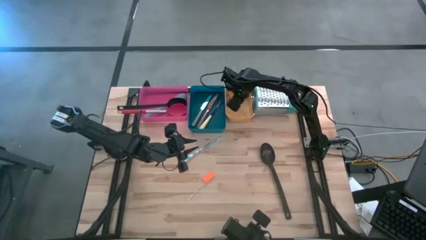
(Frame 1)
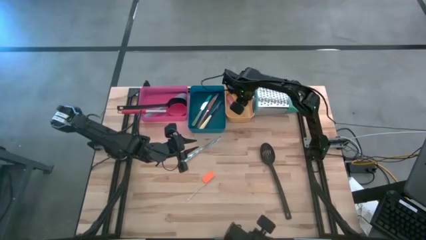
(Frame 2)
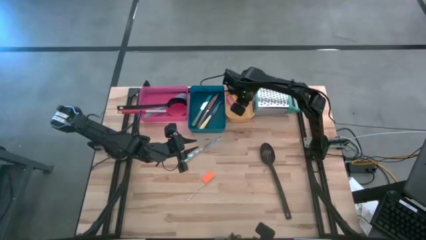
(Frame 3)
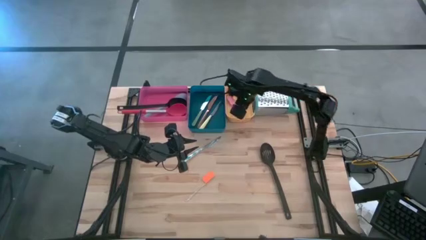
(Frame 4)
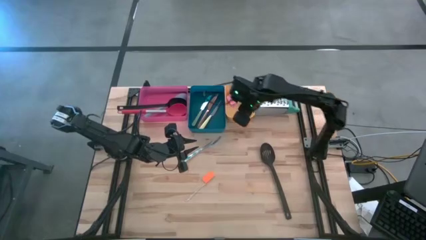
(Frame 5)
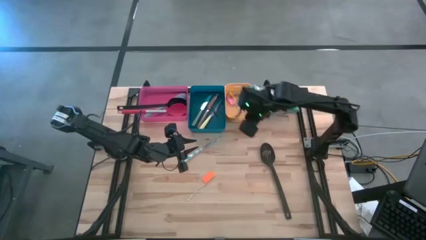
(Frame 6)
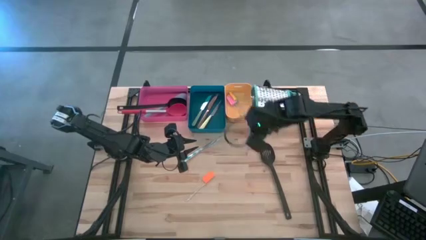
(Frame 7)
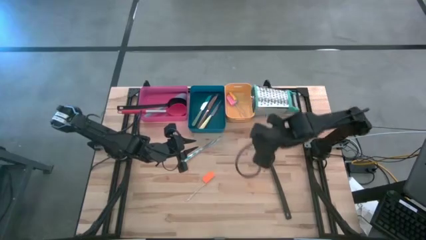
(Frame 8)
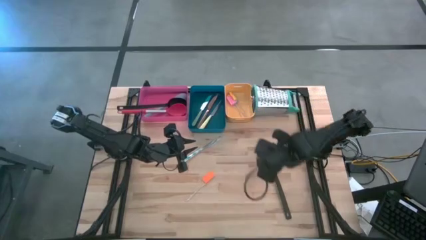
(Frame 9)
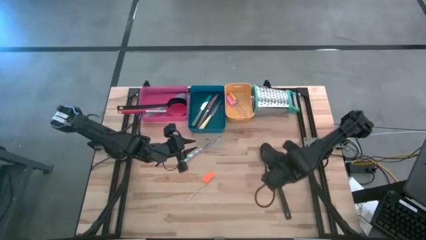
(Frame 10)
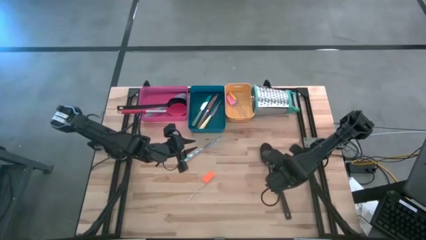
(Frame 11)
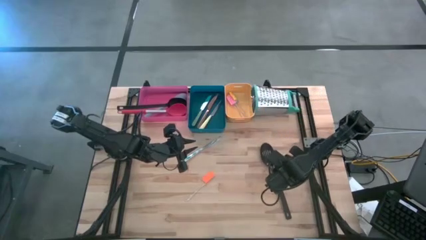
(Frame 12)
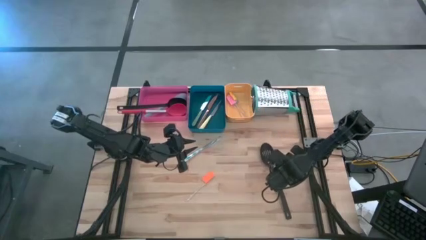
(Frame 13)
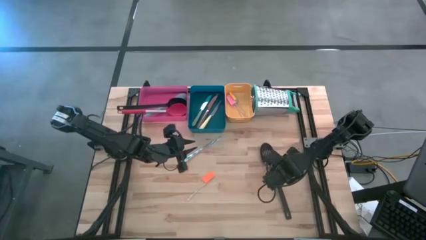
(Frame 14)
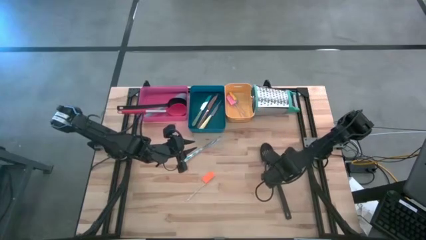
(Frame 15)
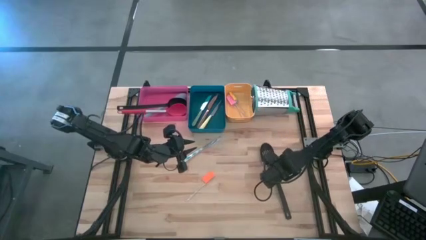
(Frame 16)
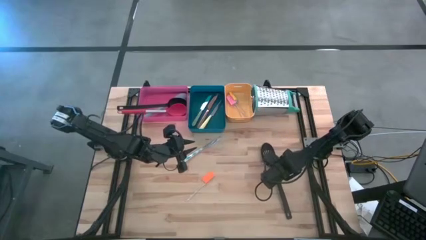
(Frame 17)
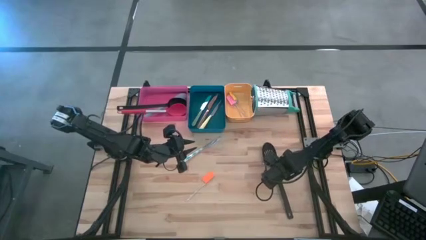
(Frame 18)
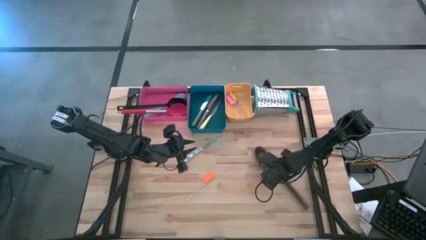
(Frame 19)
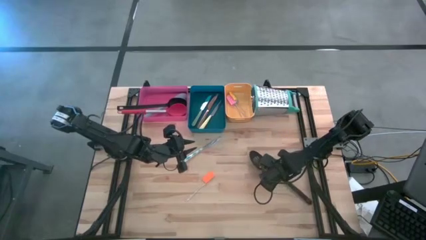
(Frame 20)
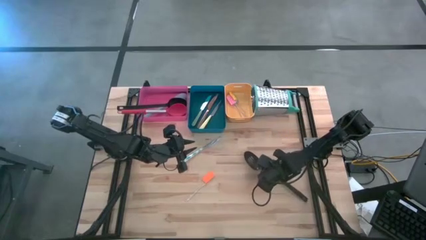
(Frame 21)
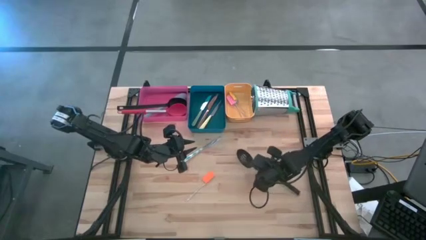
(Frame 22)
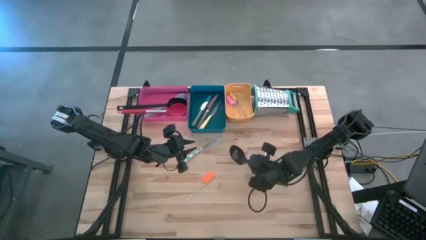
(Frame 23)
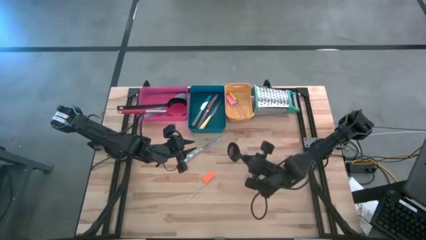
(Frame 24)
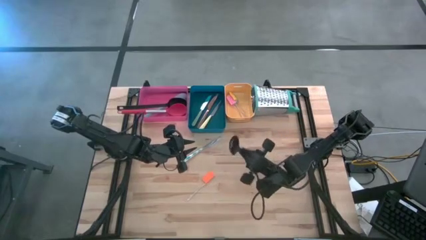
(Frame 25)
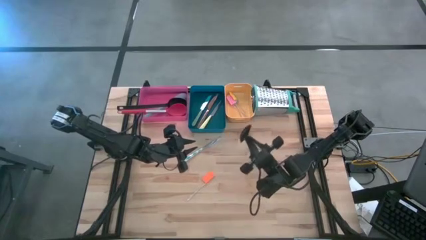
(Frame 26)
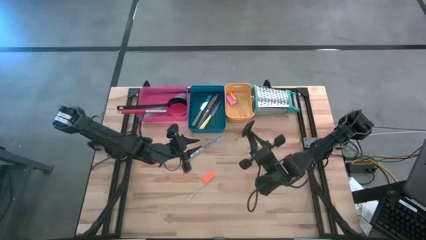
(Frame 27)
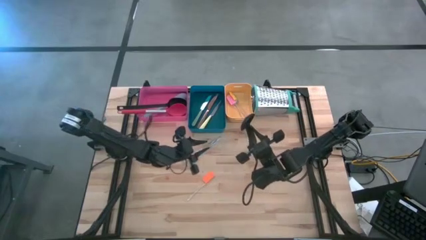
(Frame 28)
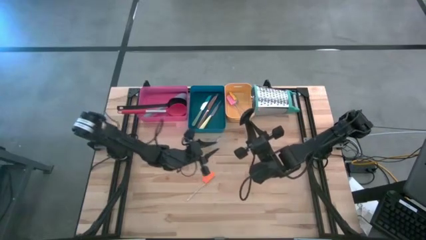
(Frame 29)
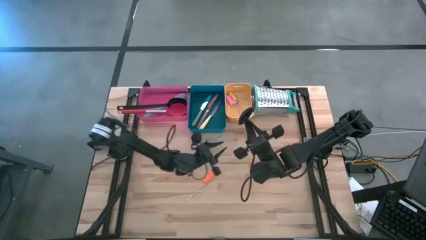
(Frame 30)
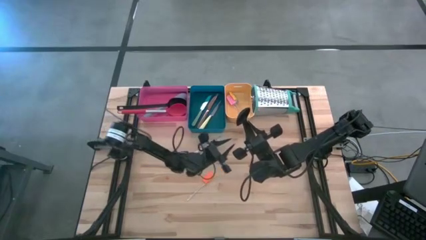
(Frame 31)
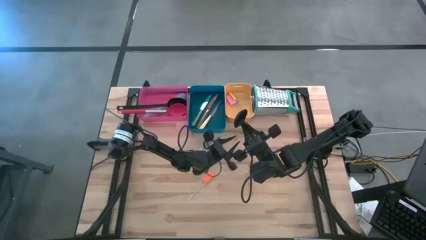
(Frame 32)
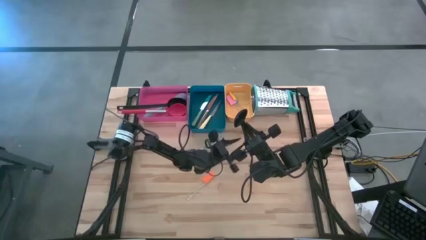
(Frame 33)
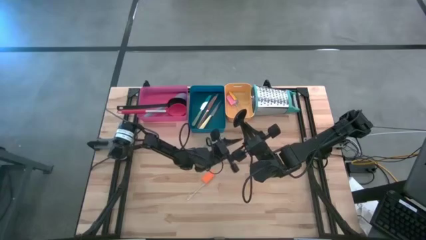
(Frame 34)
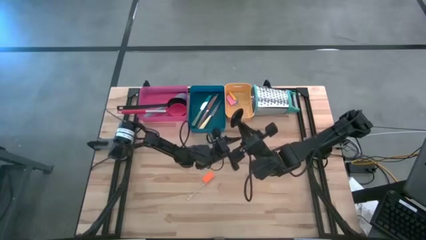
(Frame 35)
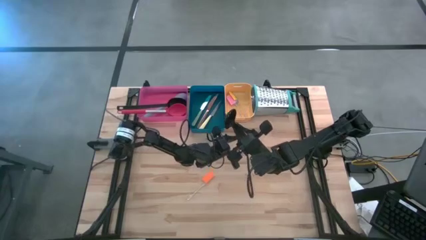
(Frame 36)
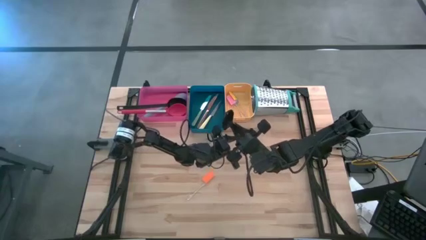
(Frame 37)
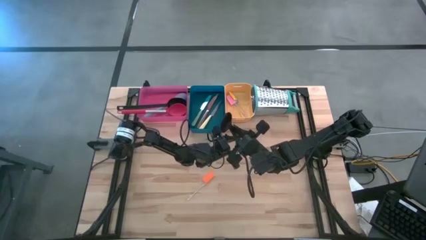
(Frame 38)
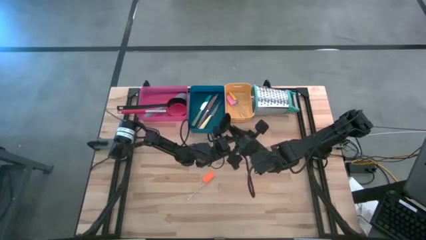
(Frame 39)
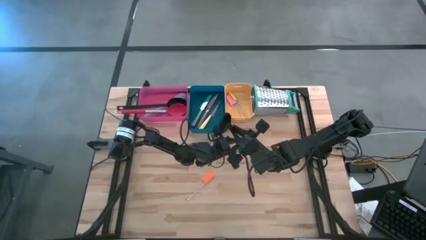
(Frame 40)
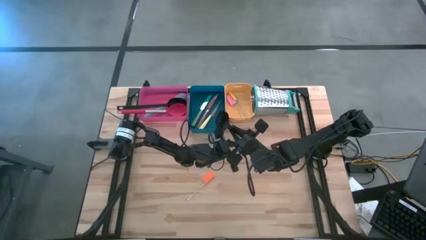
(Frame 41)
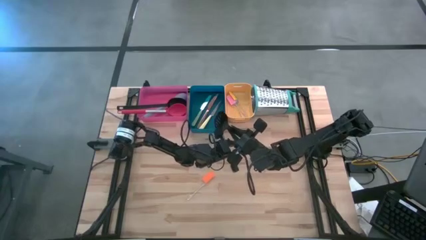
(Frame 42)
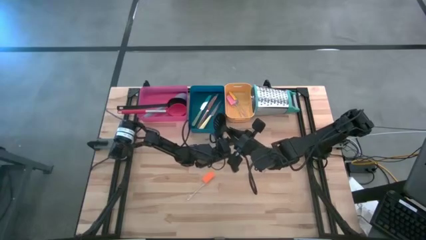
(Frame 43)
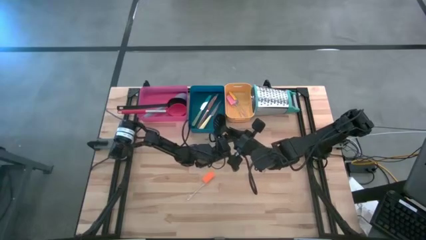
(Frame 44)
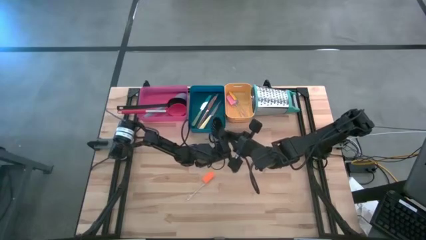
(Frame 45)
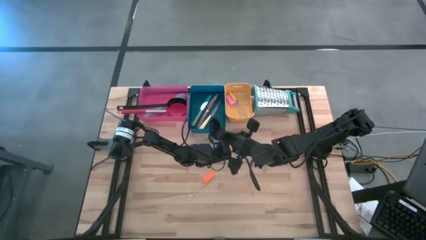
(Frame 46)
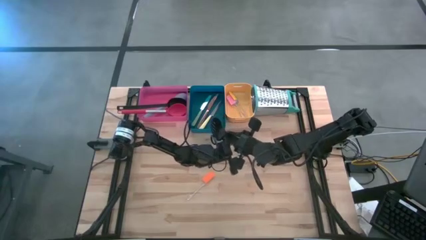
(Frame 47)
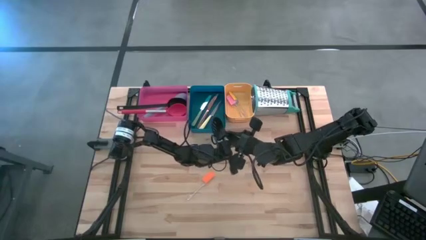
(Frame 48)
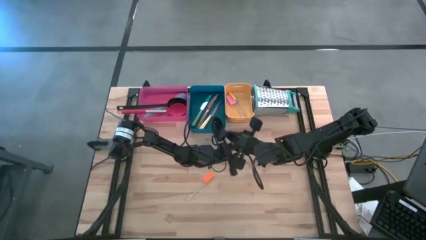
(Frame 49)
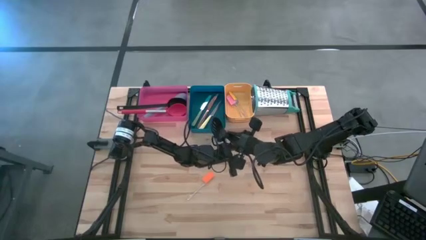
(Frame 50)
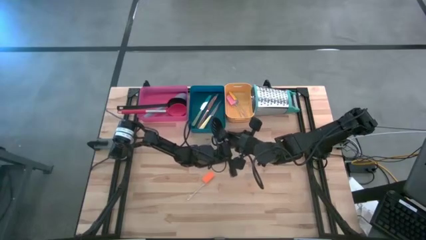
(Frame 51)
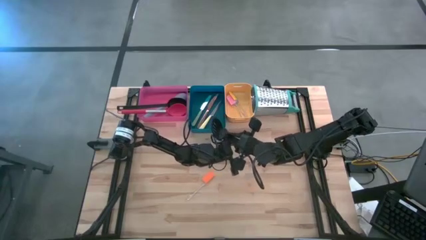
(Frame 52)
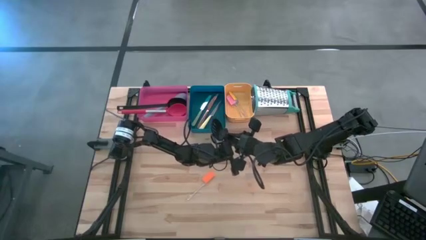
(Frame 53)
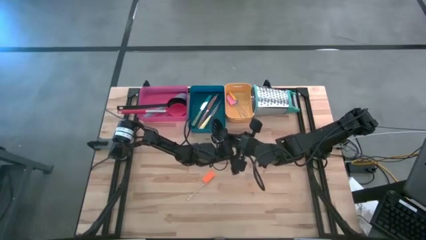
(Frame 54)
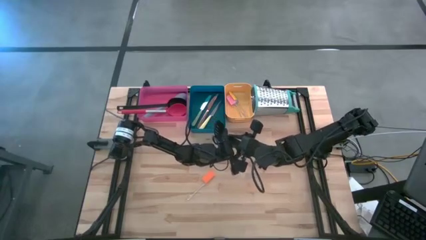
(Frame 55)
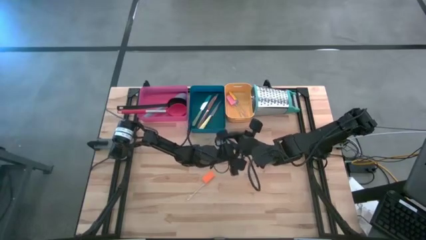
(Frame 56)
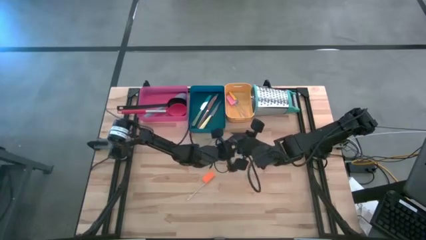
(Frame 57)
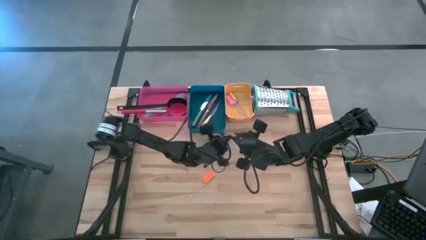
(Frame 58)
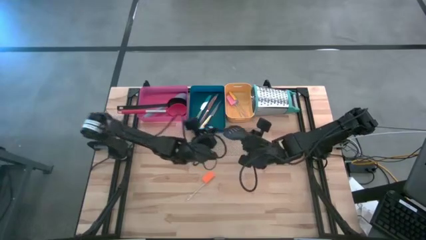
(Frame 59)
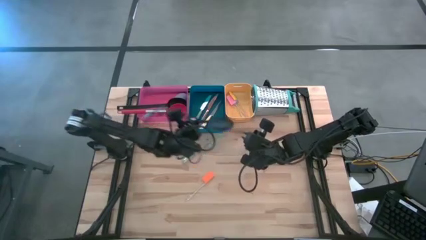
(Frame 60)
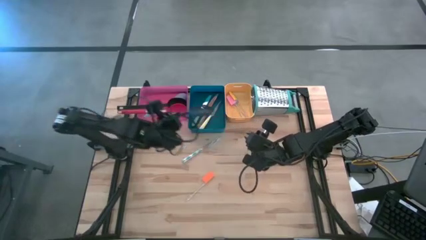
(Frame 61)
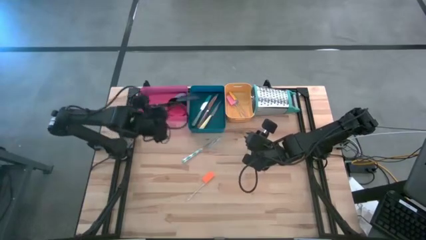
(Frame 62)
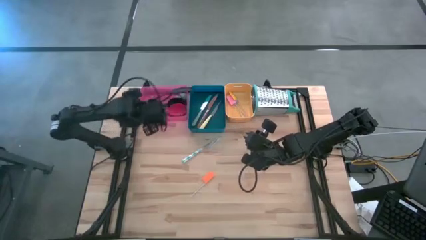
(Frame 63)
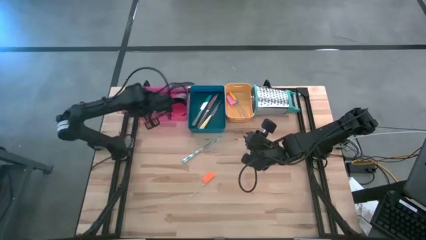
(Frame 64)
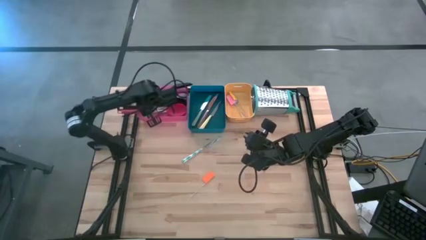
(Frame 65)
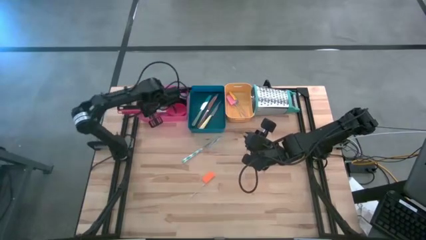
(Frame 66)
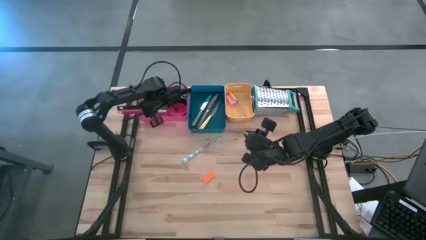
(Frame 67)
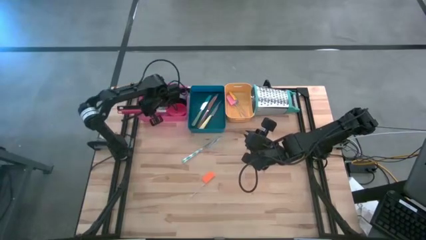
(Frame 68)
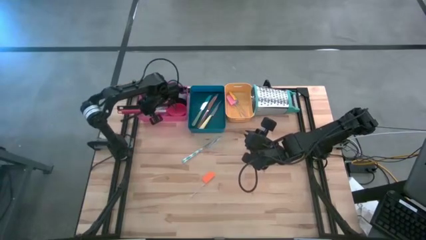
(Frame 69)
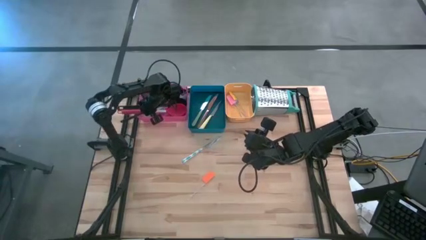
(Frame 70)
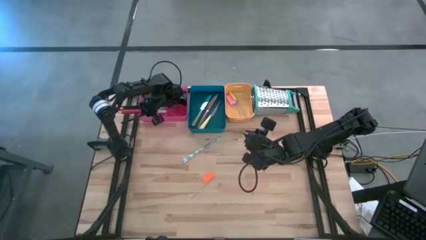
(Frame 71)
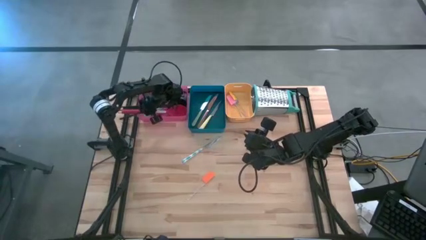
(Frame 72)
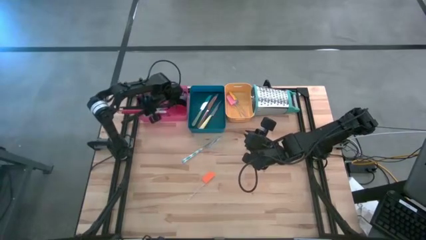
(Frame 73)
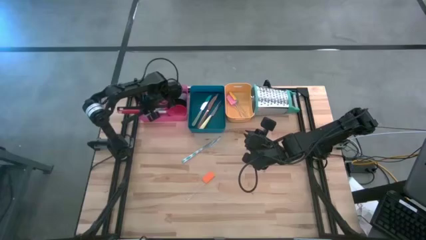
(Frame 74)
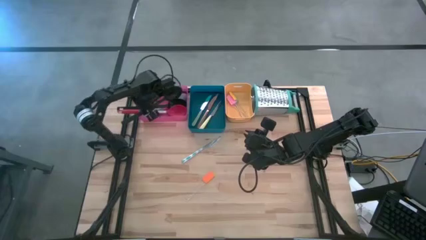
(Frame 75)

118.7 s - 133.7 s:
Task: Pick & Place Kitchen Items
Put the black serving spoon with holes into the pink bin

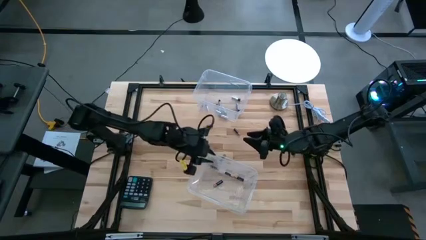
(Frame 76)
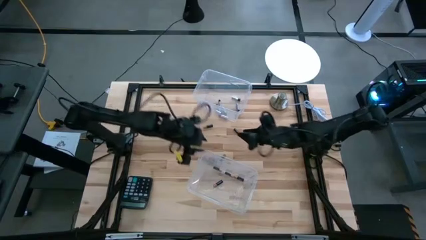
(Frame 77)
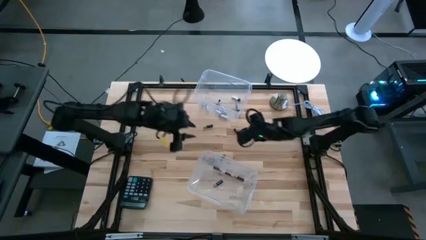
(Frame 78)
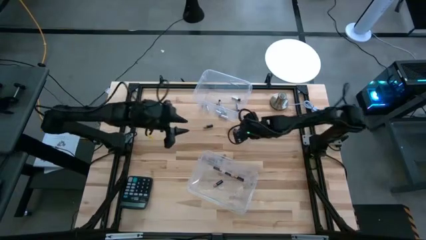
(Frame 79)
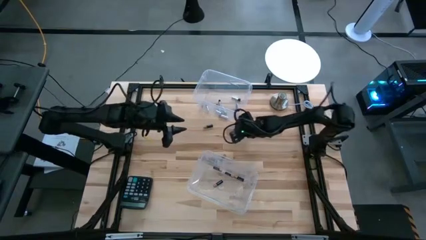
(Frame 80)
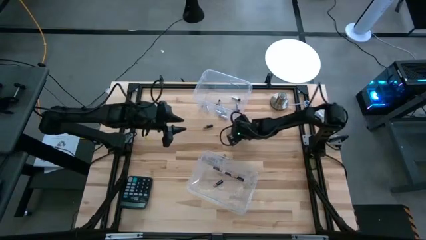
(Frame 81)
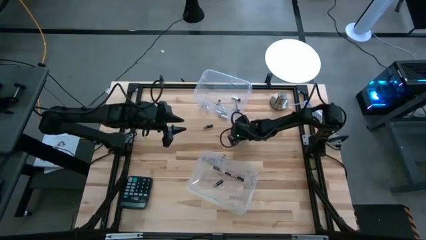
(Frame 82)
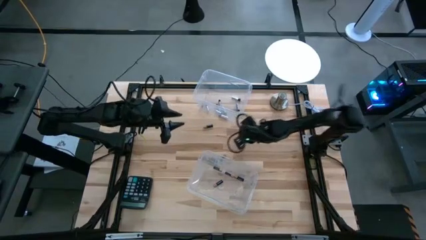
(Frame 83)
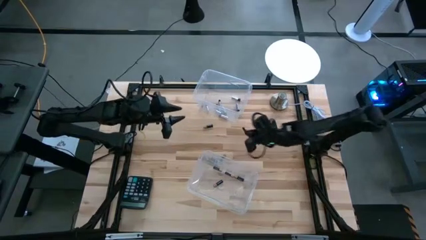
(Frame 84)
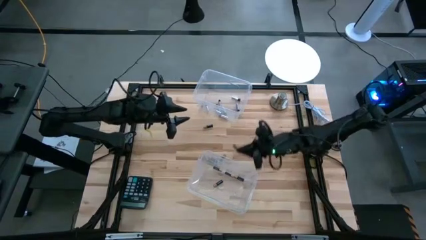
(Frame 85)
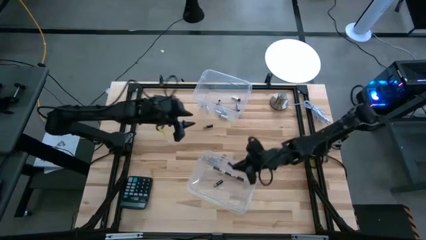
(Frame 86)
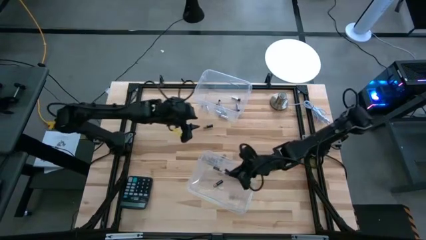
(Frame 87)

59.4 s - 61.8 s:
Task: Sort batteries
Put the black battery into the bottom transparent bin
